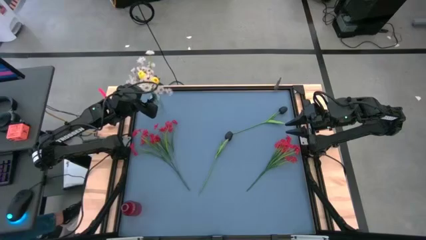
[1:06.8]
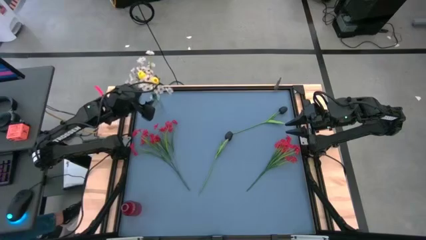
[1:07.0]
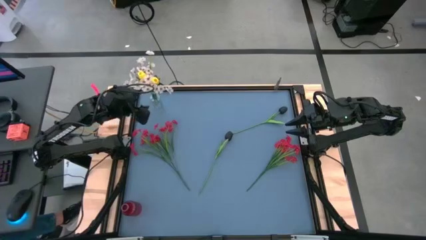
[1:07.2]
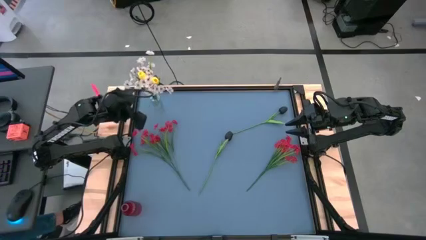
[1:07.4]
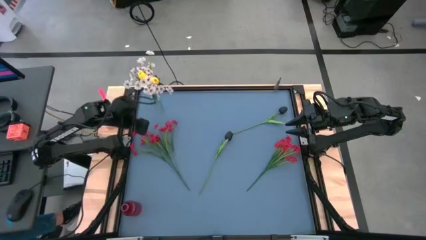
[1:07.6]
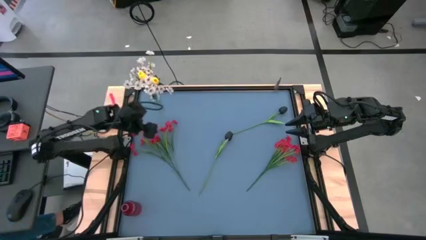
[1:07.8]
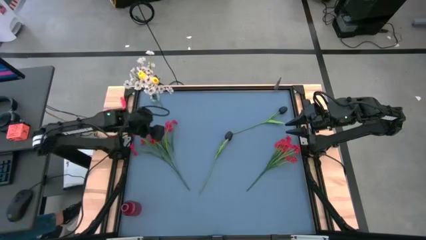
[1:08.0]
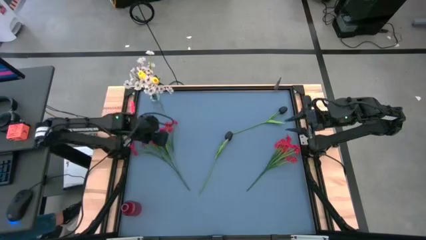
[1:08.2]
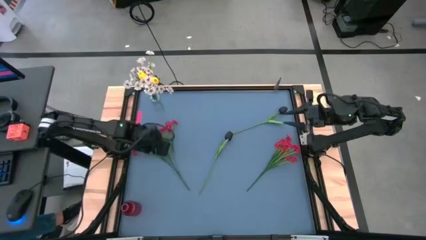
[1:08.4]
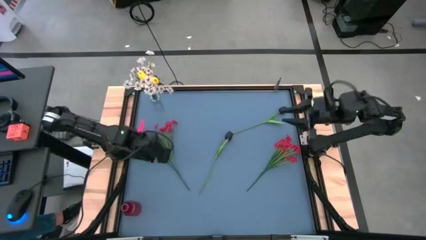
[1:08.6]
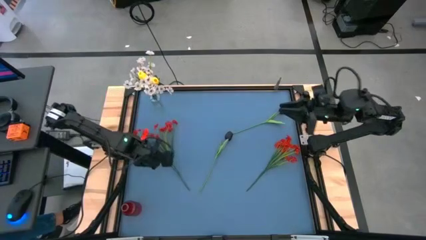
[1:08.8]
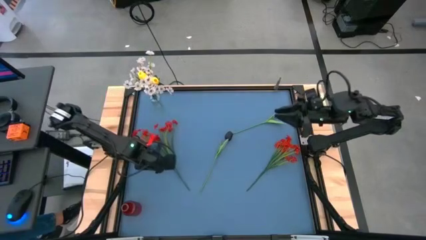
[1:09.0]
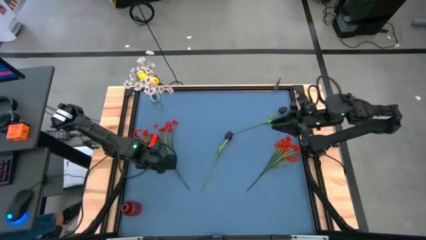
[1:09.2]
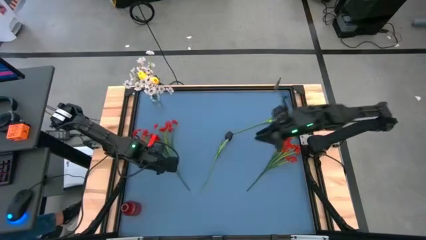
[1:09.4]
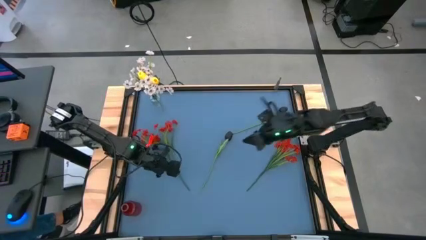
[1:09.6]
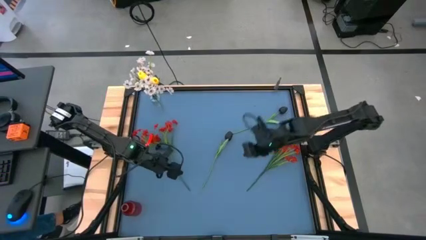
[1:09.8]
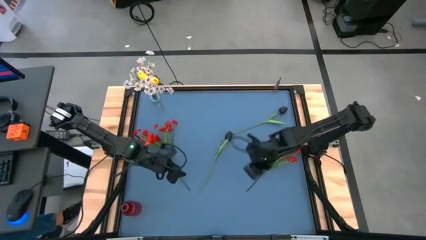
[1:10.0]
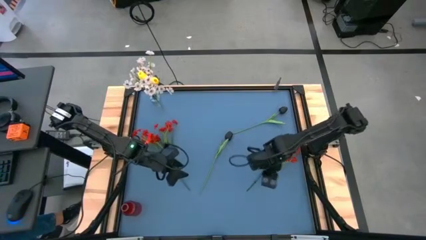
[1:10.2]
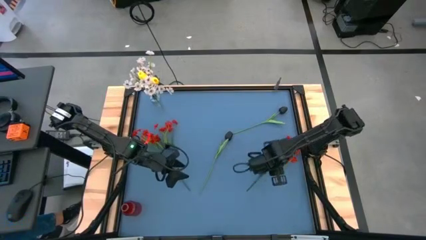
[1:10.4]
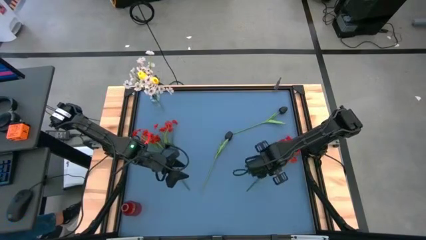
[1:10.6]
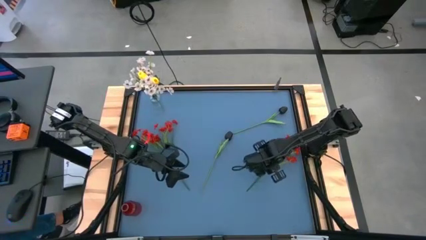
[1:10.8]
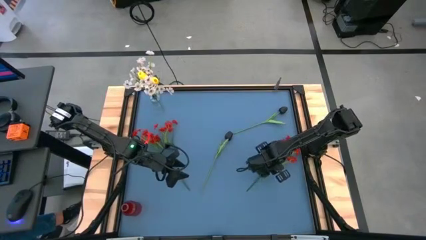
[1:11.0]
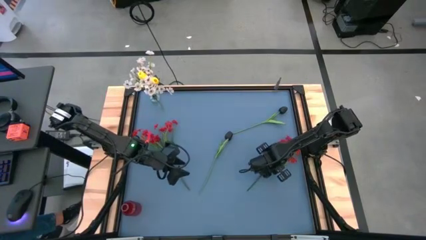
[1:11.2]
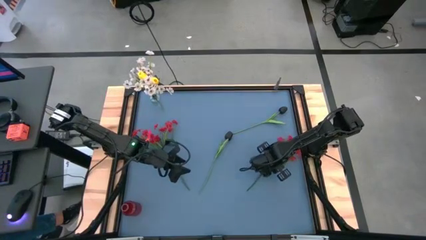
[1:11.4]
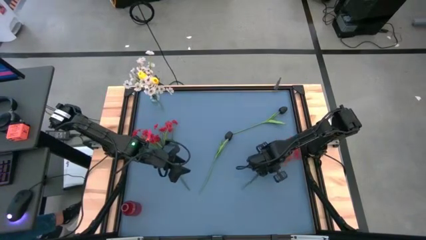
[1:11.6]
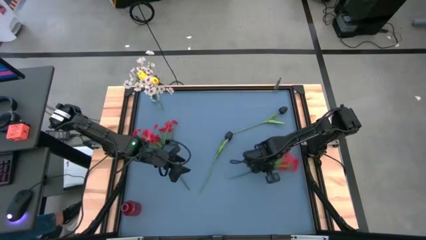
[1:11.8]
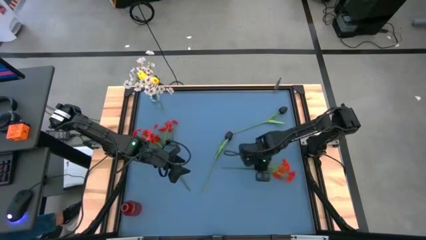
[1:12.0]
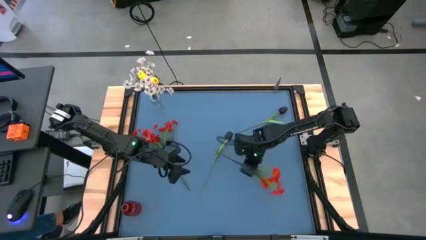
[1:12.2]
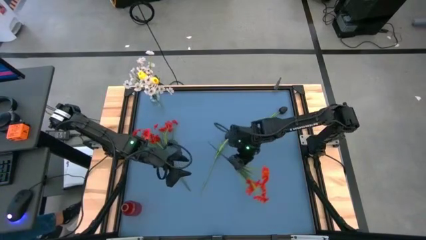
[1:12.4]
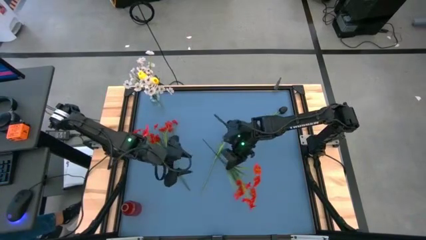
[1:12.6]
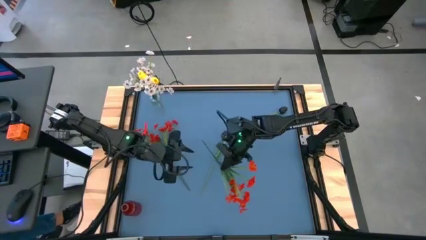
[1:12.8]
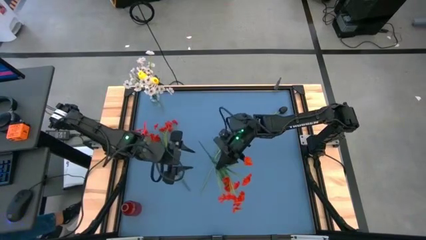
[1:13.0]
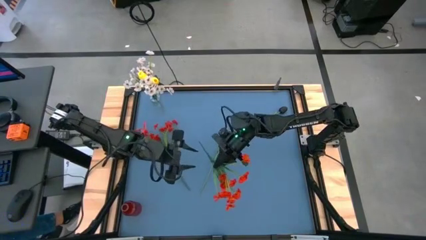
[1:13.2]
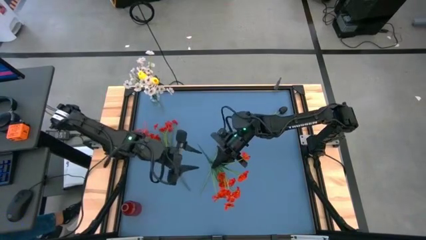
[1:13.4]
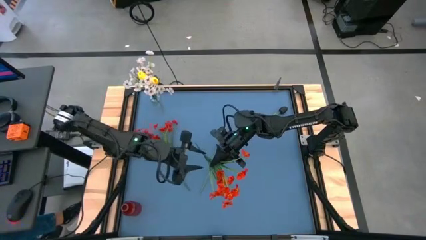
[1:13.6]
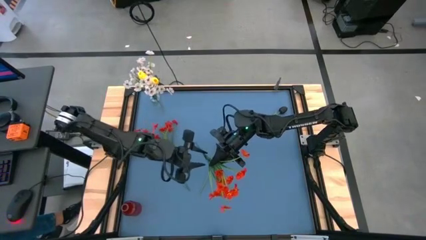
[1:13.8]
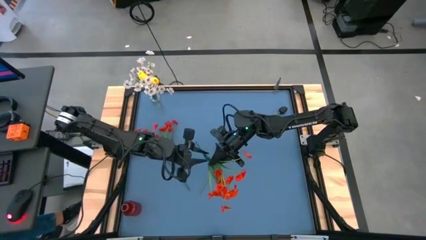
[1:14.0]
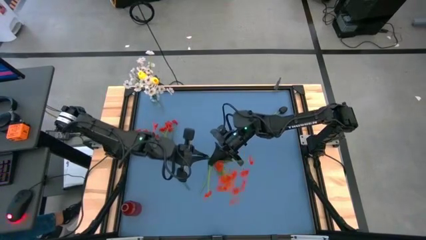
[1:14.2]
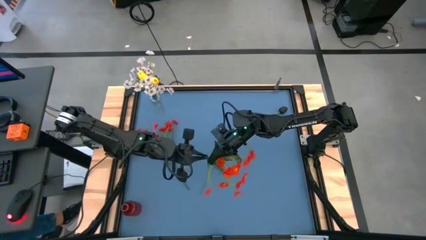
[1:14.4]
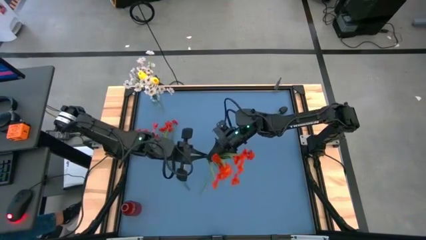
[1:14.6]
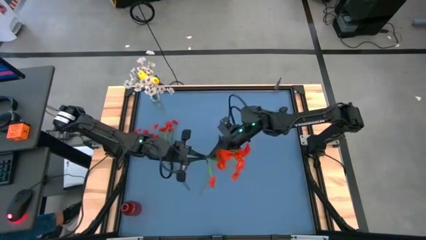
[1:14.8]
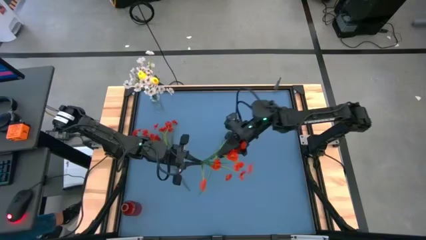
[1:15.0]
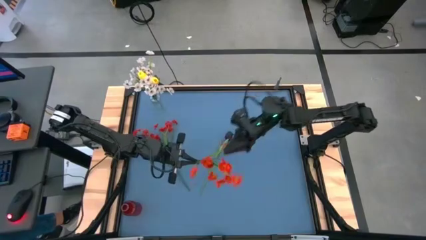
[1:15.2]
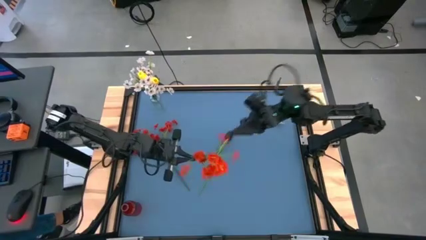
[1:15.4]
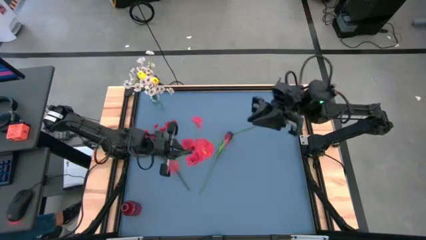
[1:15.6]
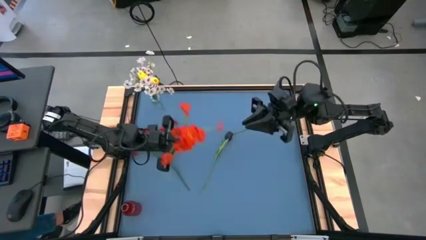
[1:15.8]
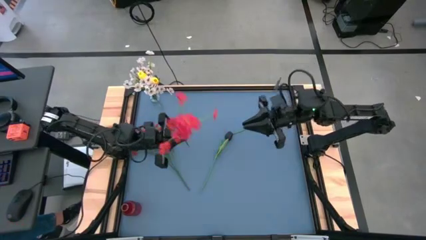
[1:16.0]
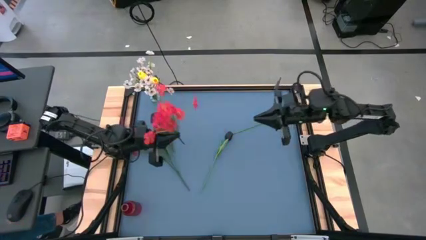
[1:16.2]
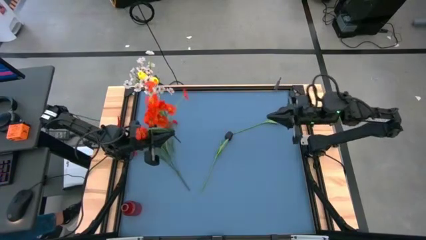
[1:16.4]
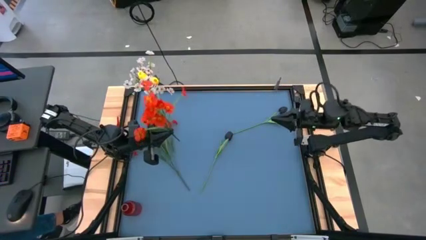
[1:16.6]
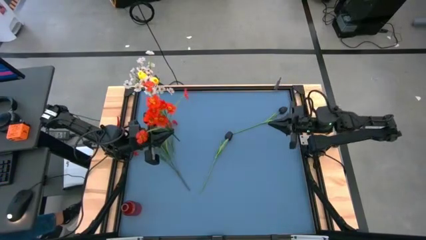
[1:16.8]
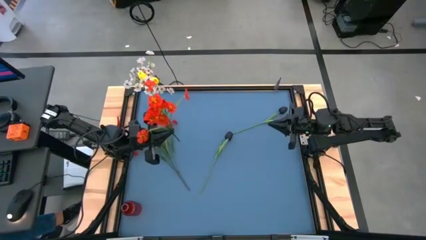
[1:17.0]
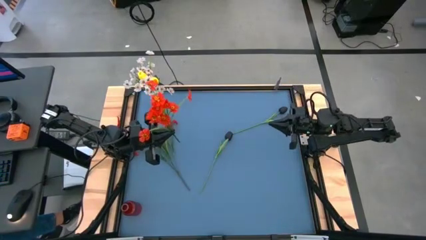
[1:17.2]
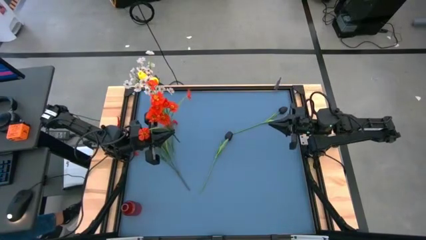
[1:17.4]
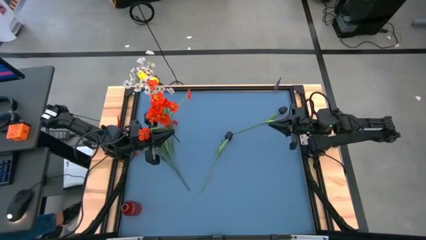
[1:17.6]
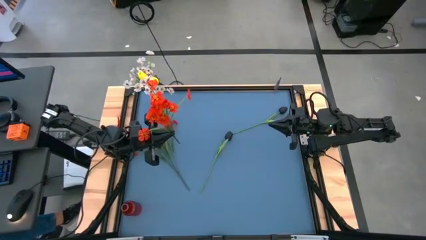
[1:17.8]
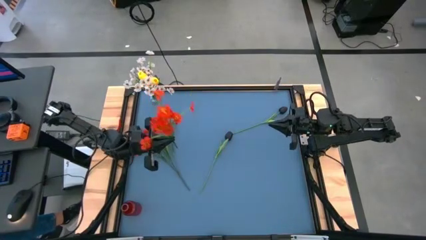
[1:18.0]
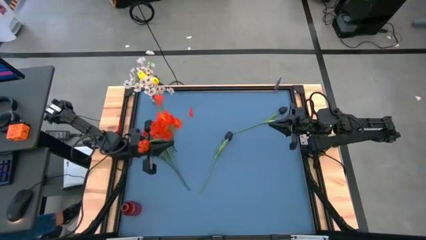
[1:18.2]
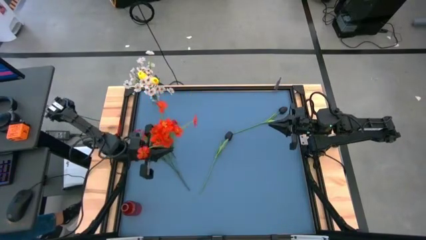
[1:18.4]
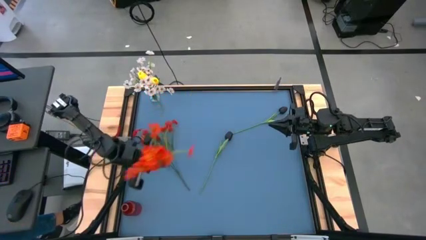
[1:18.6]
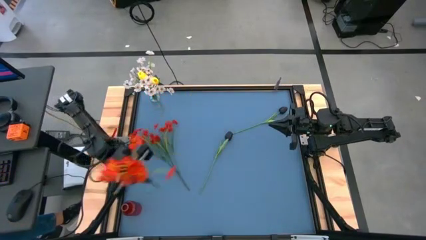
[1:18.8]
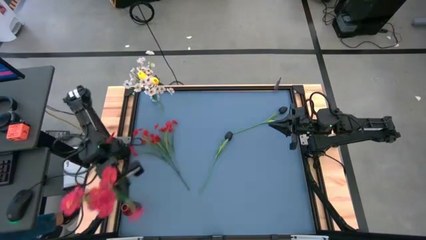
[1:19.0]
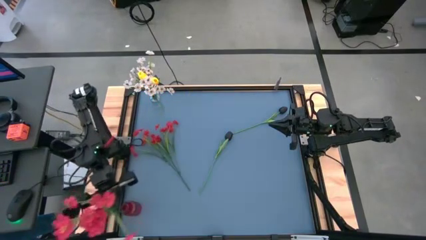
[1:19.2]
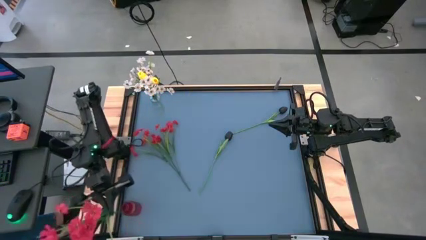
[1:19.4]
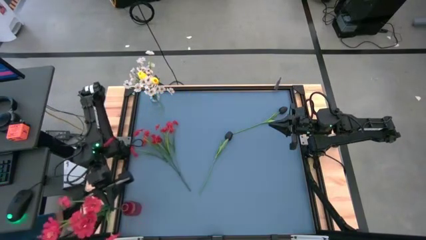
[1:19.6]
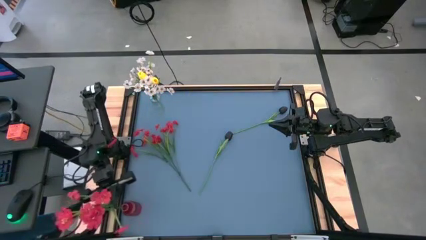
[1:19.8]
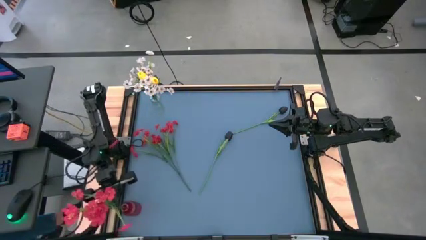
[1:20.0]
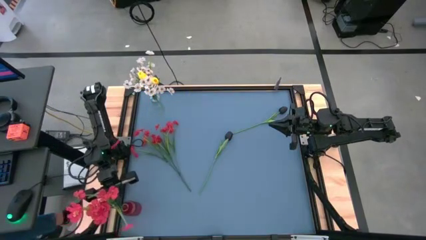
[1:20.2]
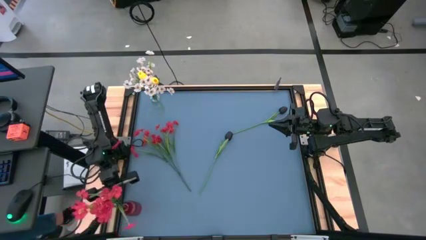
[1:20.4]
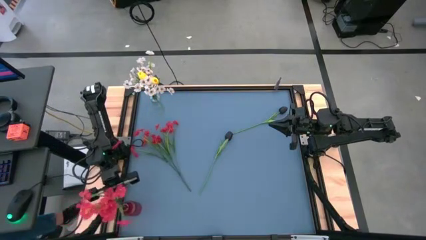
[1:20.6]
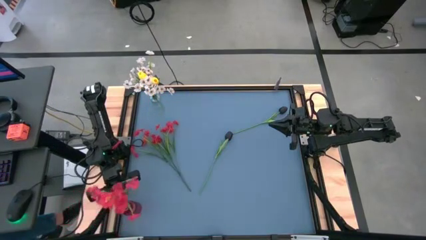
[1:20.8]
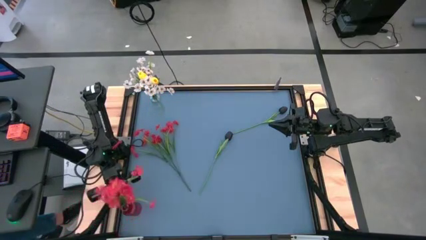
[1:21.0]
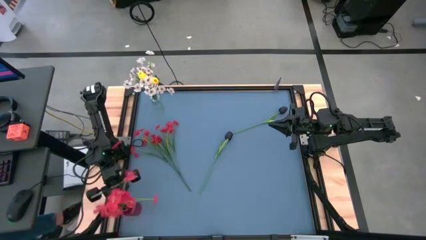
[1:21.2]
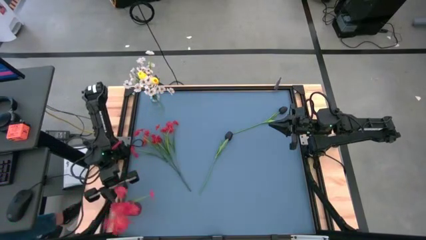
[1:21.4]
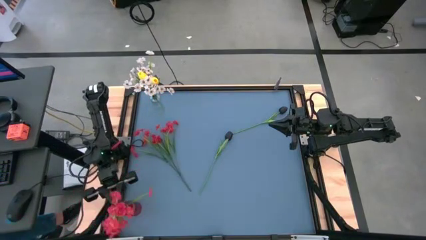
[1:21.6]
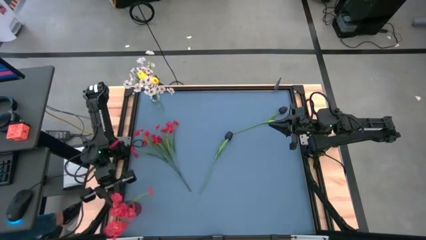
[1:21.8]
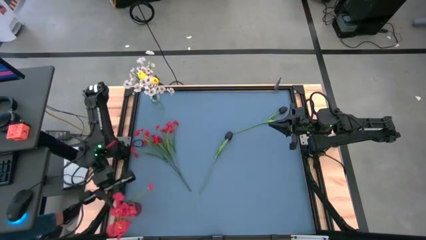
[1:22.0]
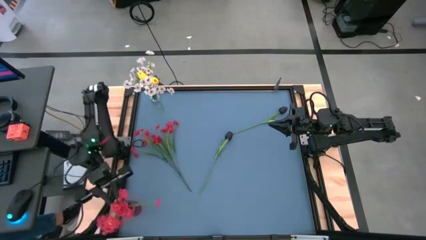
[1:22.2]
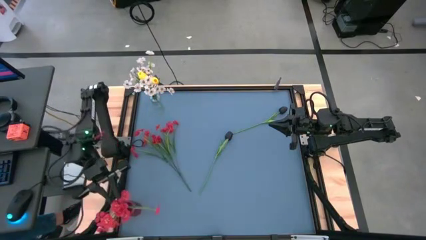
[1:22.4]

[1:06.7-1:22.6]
Task: Sort flowers into vase by color
Put the right red flowers into the red vase
